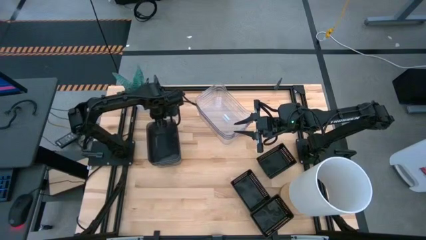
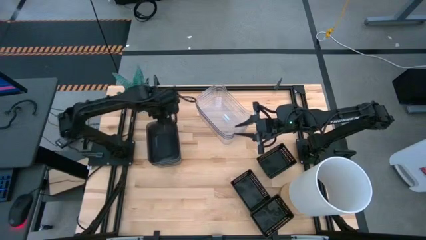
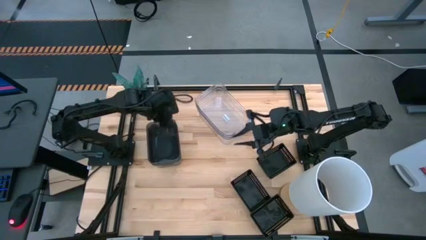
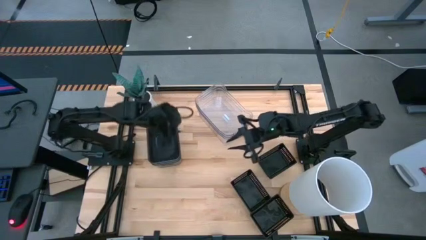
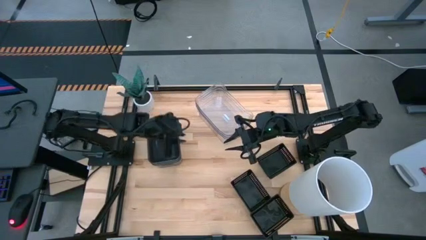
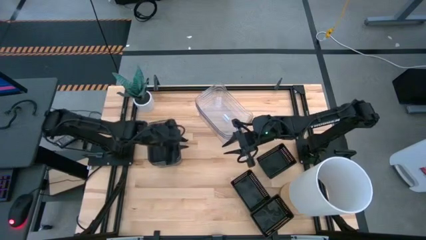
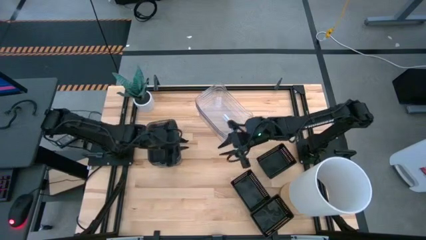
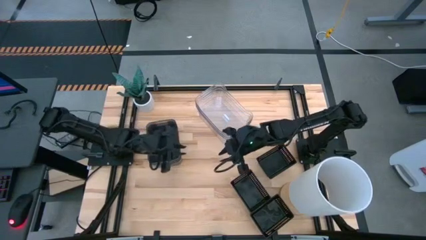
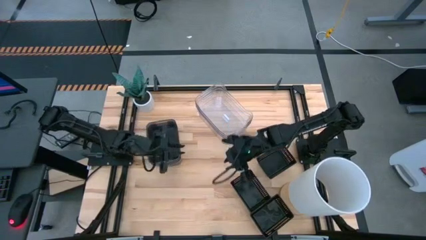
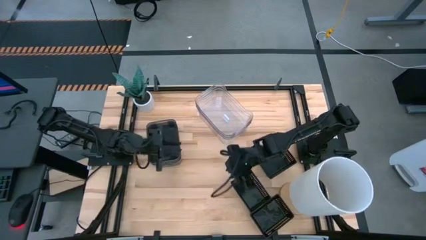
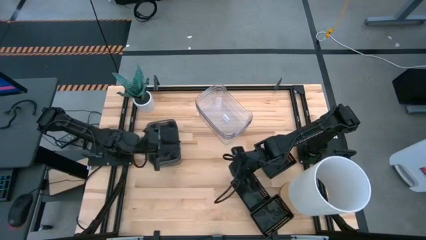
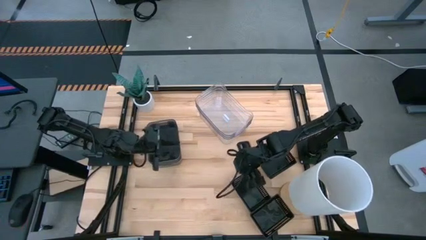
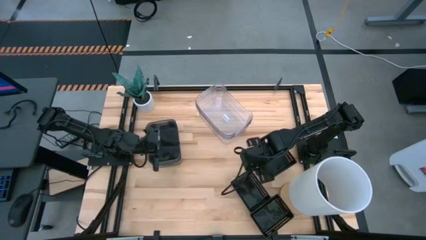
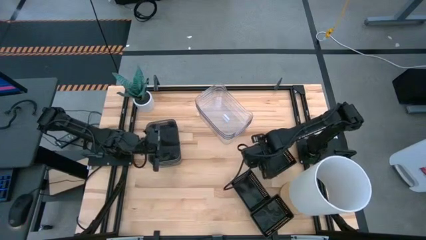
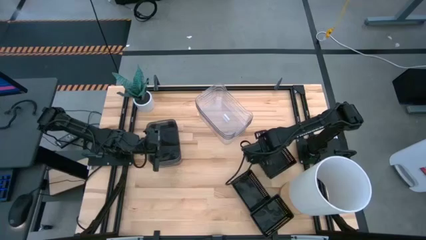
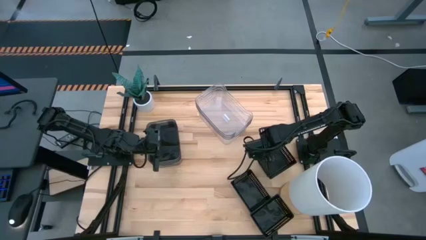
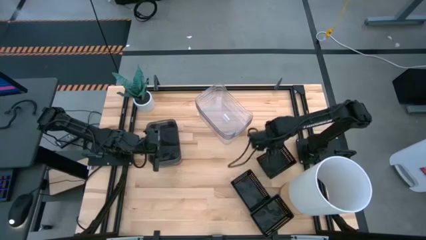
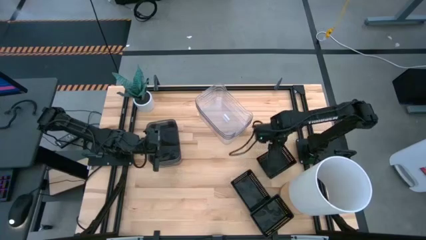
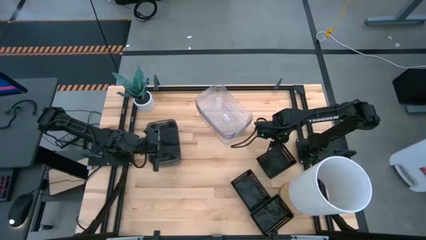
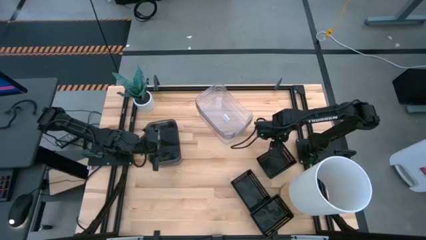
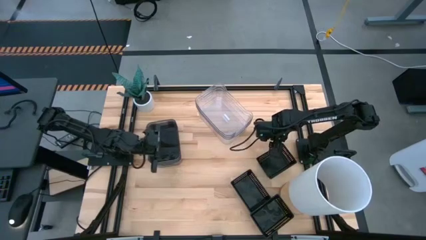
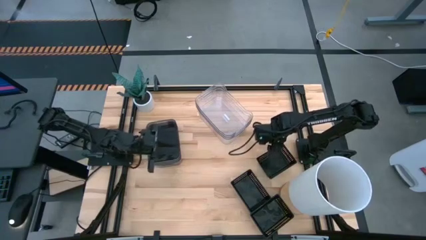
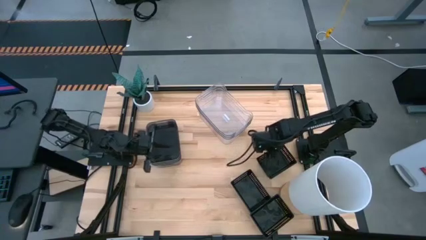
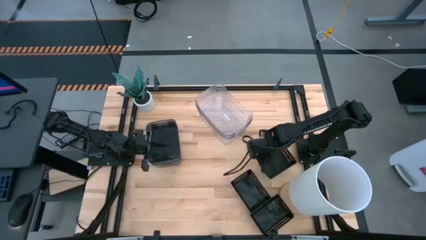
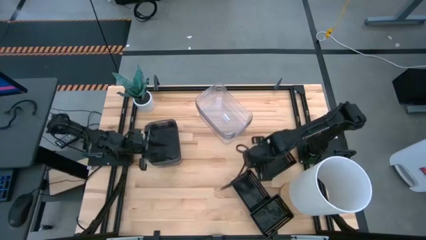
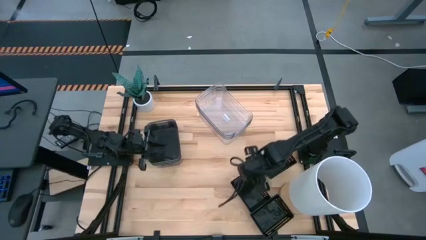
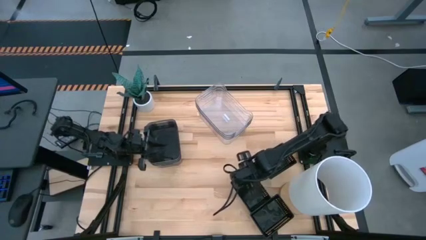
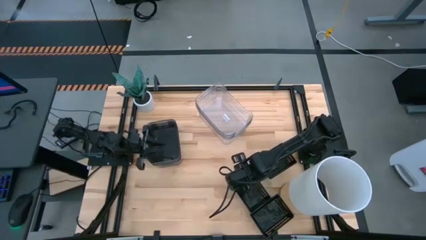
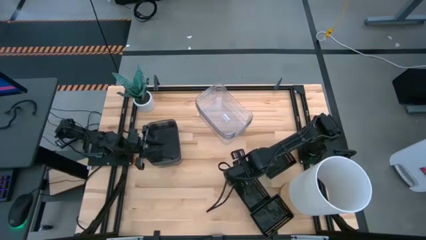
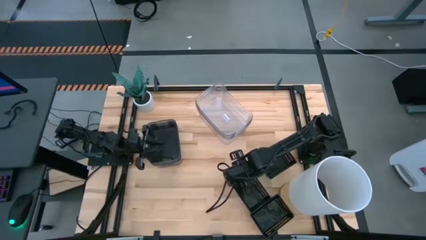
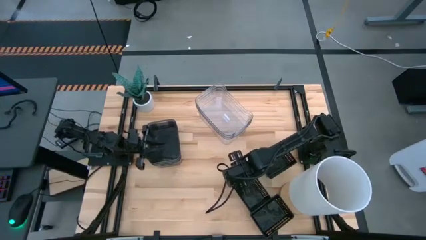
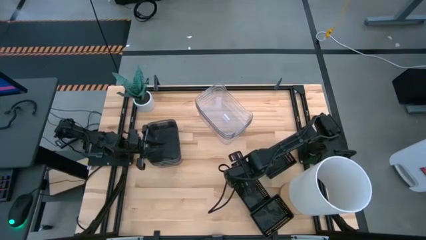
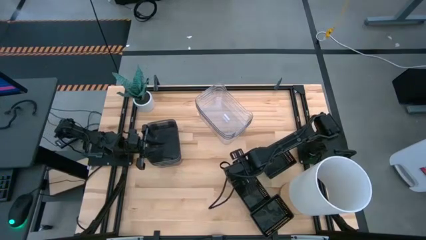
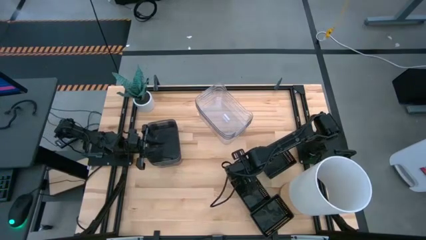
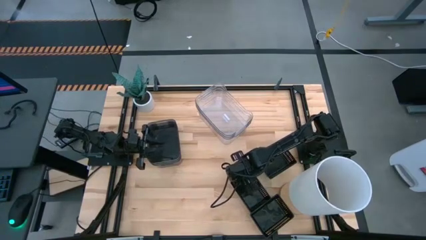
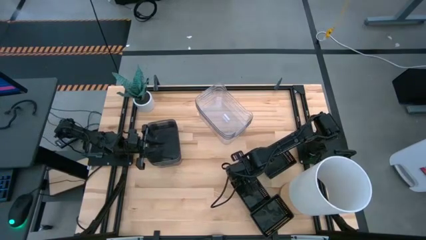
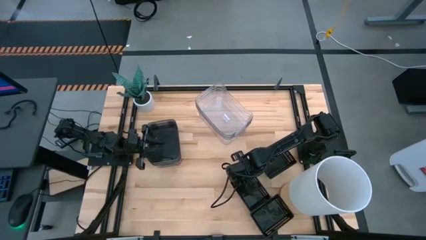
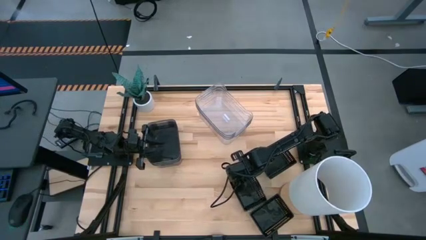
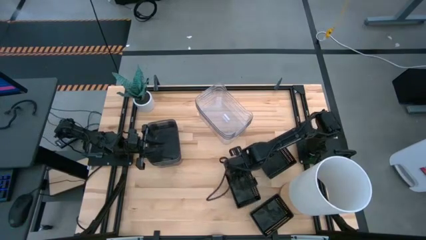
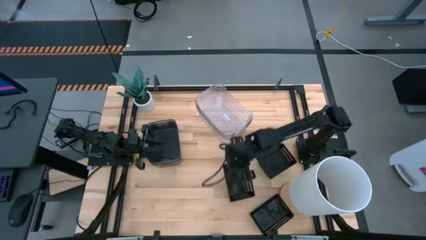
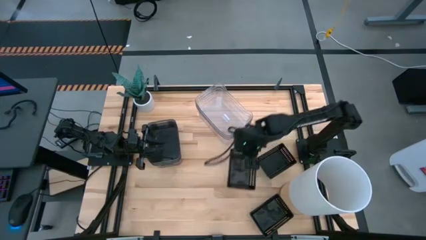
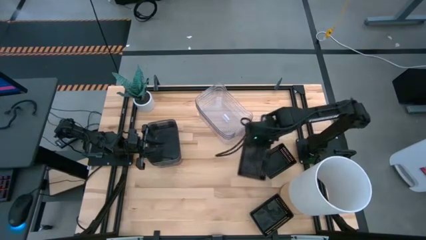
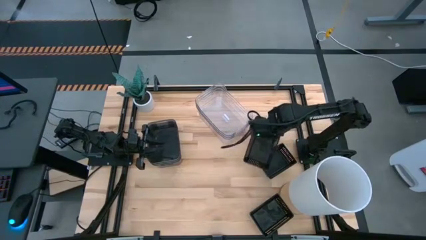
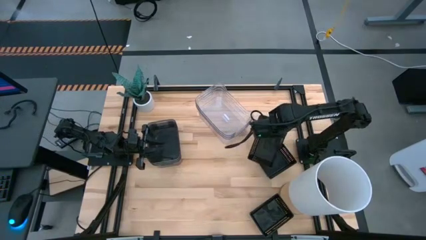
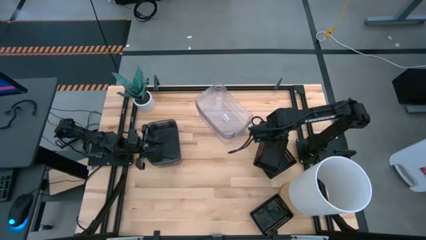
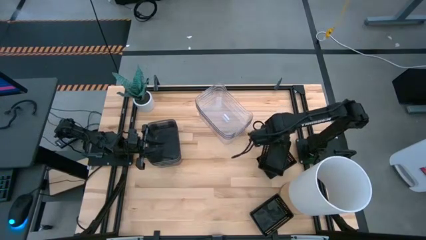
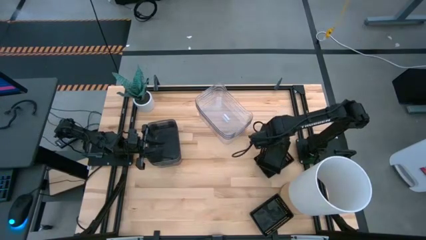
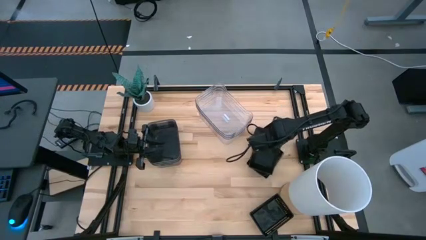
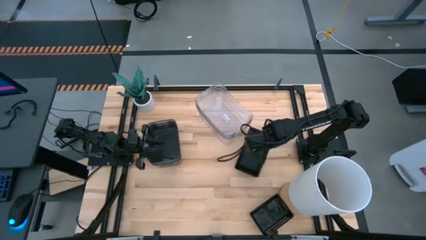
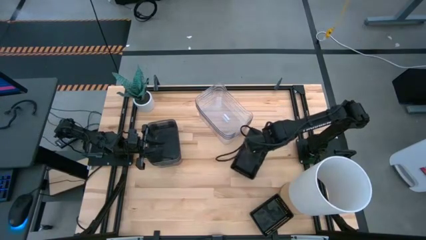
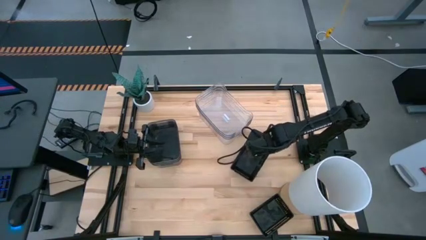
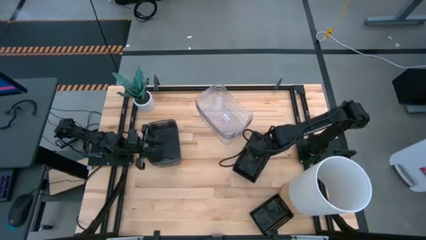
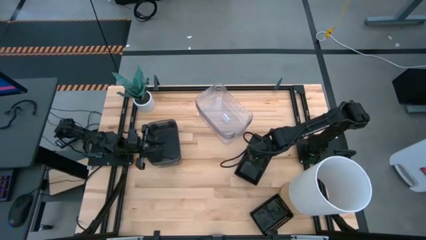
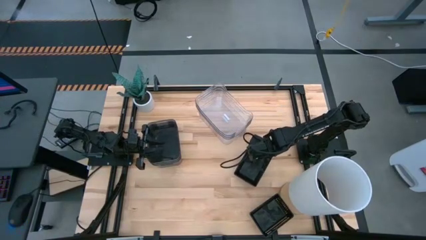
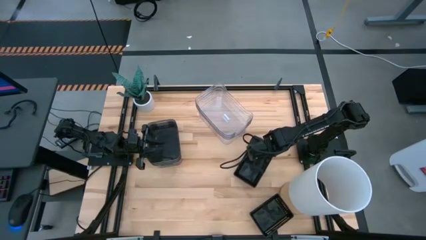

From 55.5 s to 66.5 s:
Stack the middle black basket on the top black basket

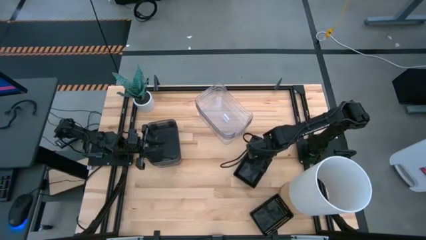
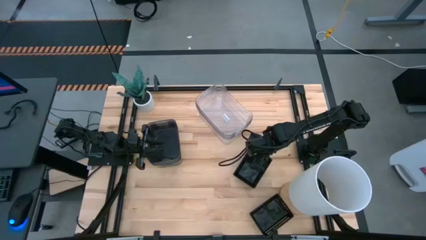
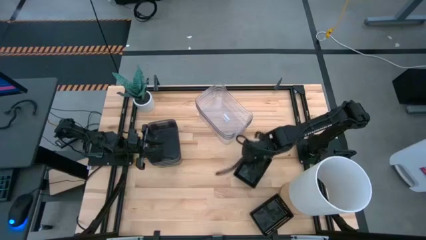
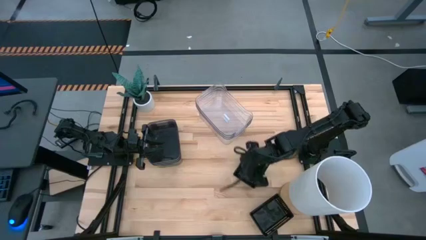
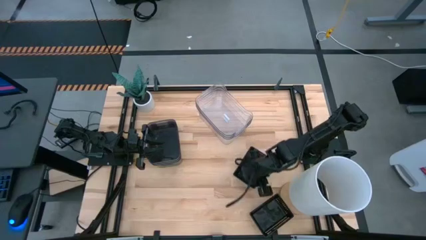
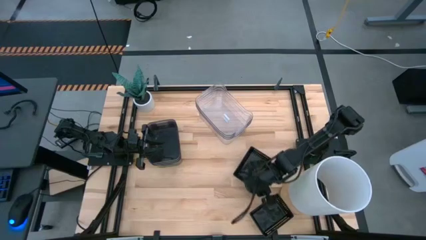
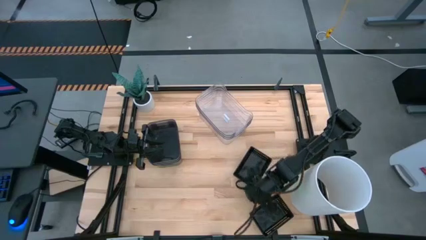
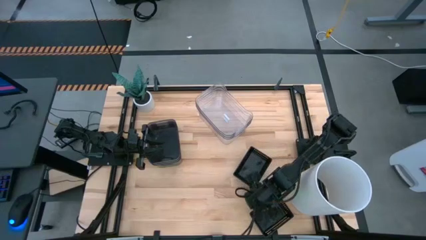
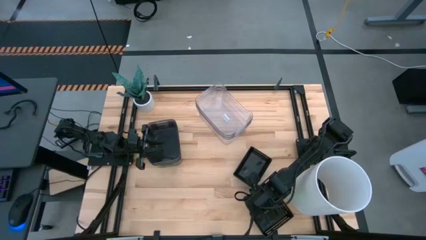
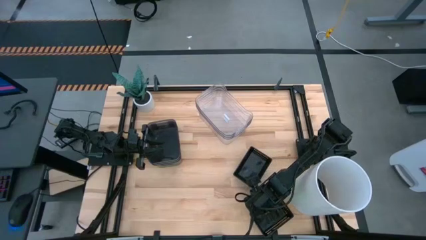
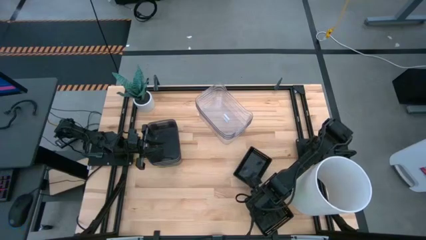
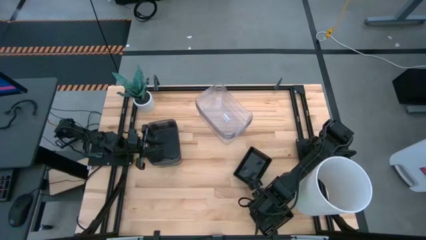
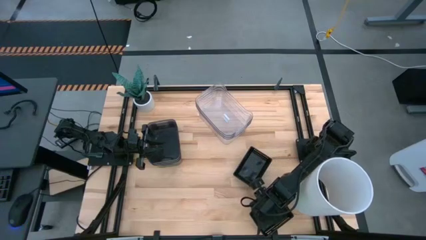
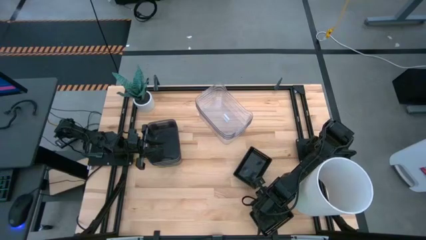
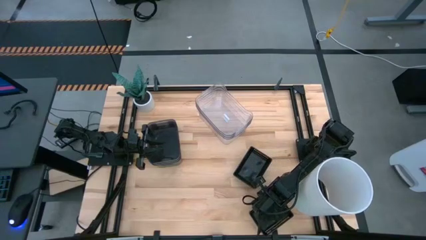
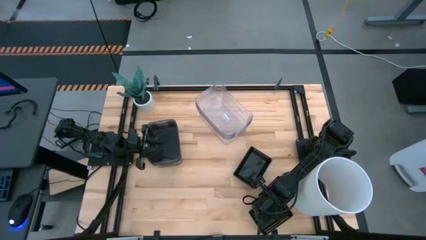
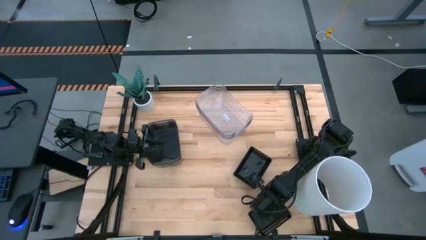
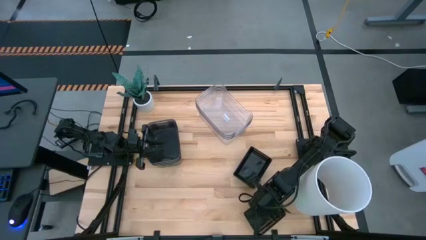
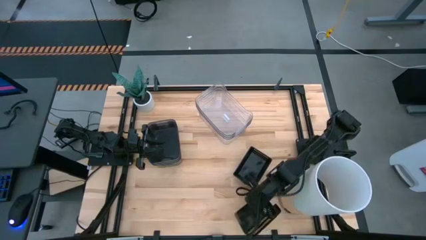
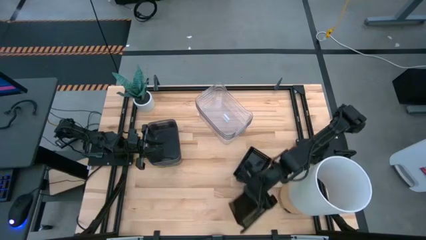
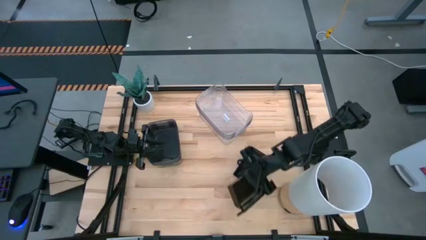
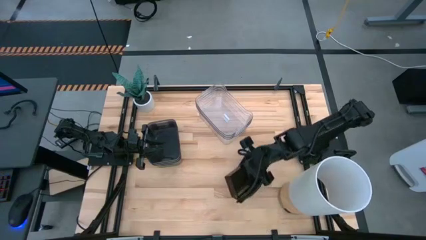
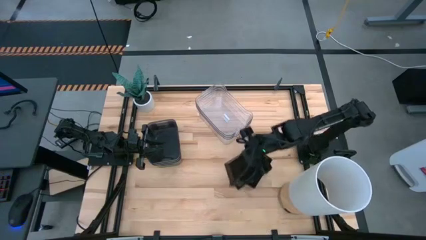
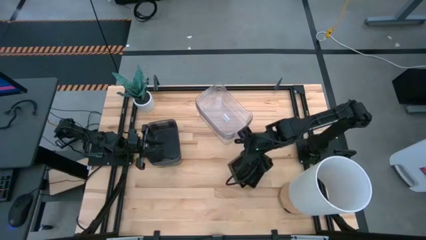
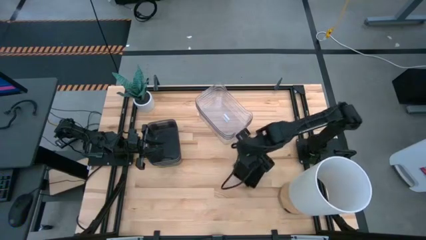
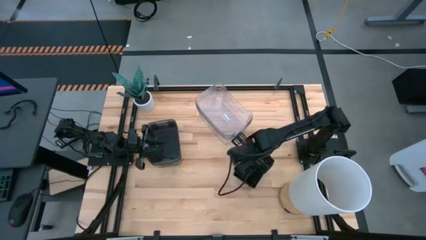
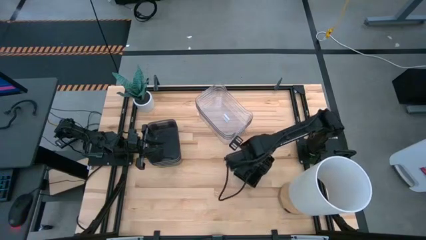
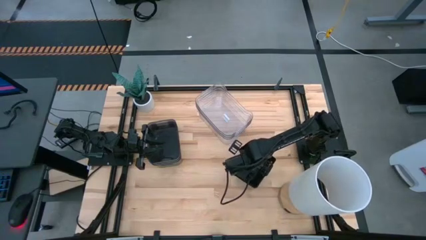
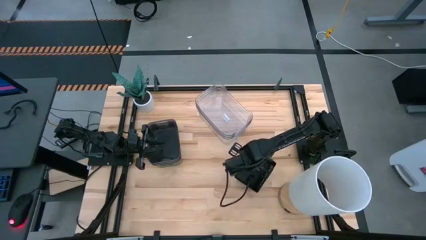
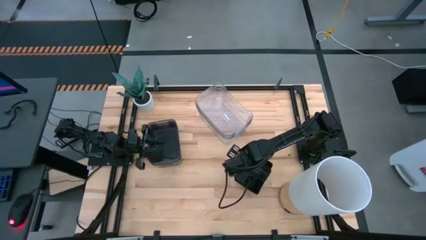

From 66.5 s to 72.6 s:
Stack the bottom right black basket on the top black basket
